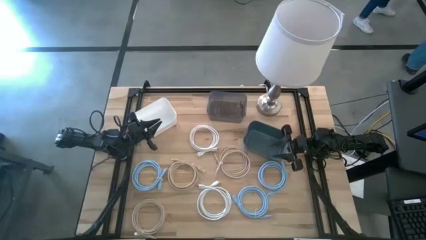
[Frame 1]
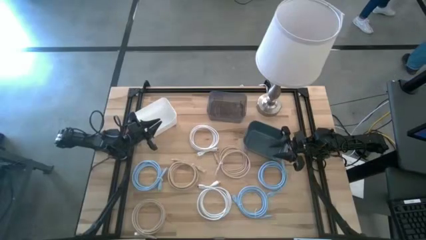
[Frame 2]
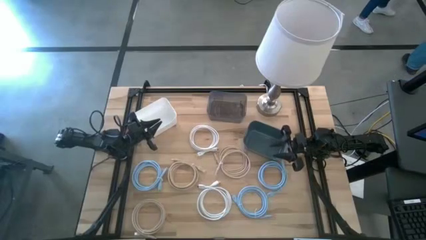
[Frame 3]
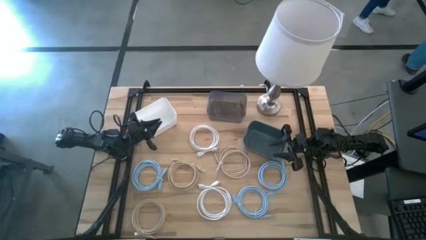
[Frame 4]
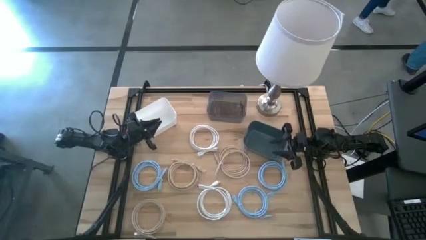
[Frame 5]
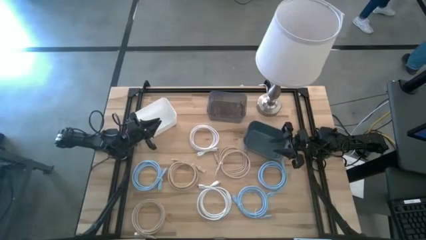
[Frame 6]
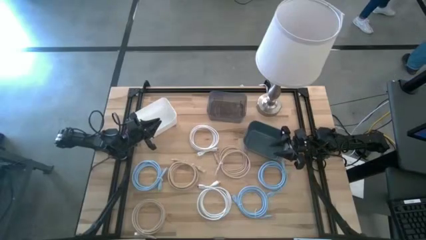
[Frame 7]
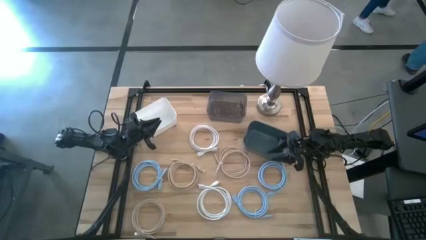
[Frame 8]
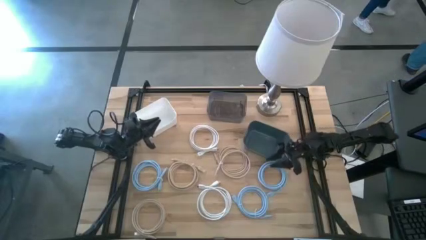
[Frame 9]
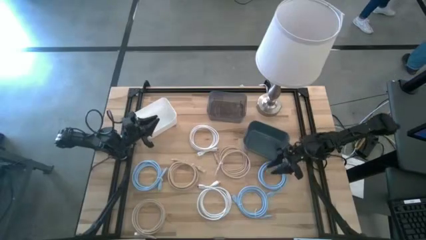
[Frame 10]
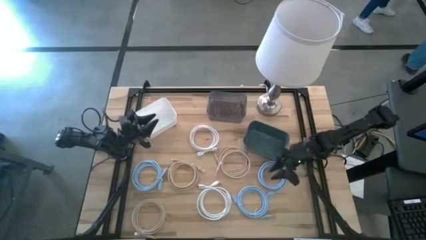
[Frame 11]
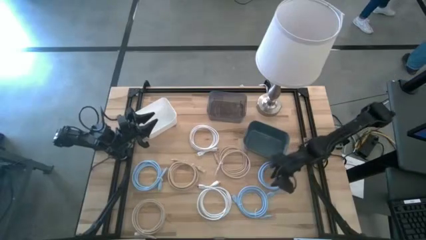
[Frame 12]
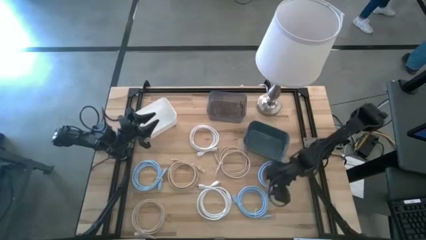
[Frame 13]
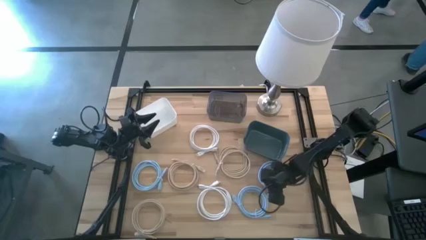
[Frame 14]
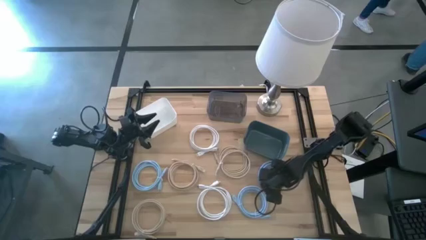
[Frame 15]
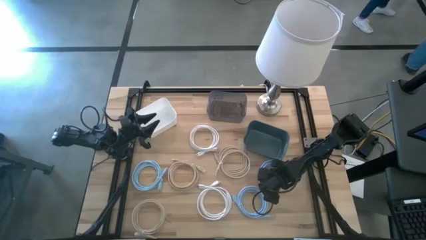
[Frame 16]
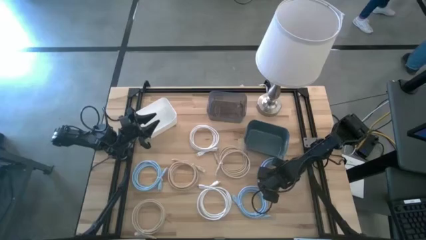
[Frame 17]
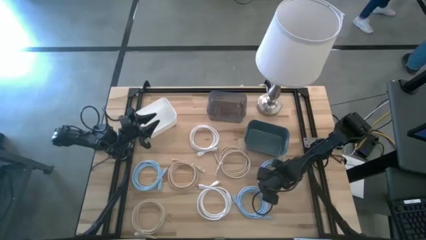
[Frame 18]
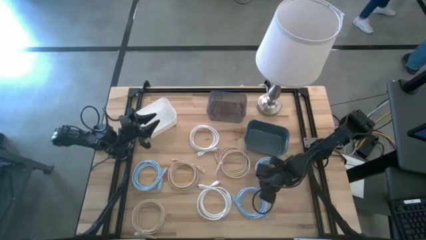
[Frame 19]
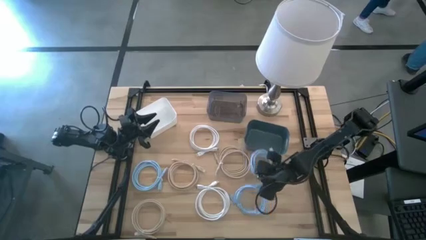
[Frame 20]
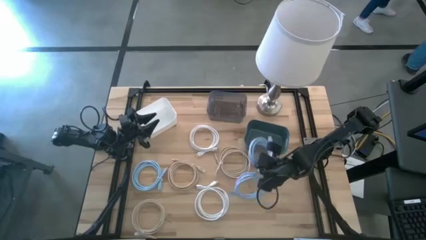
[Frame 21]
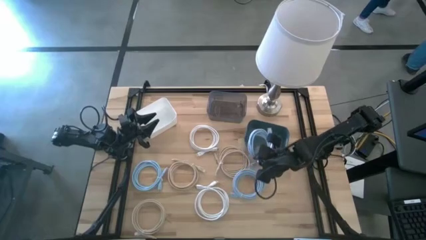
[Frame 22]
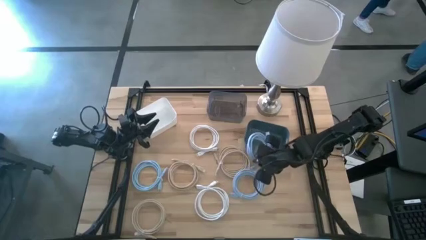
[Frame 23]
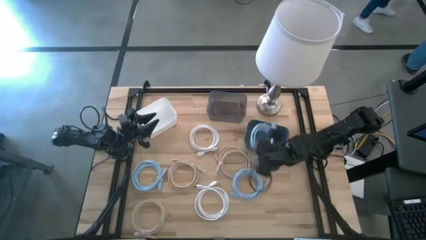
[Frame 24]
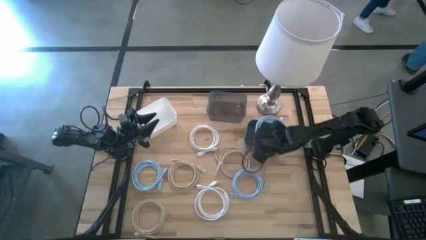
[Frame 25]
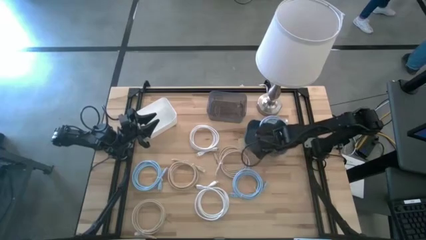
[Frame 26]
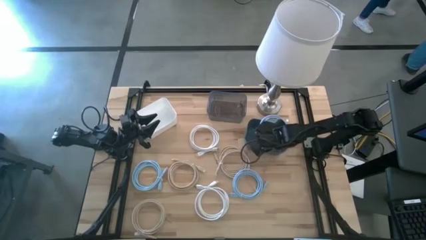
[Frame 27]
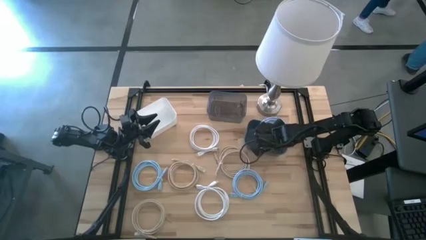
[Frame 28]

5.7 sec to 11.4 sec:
Task: Pick & Place USB Port
Put the top blue charger cable into the blue bin

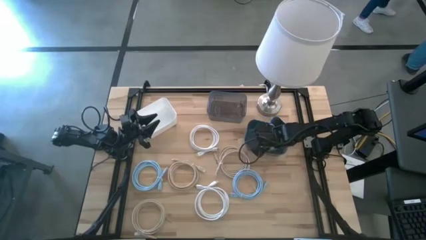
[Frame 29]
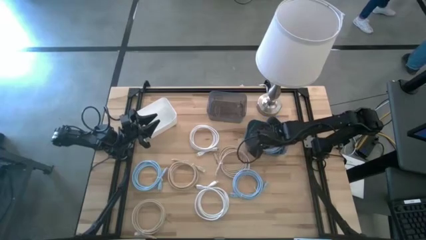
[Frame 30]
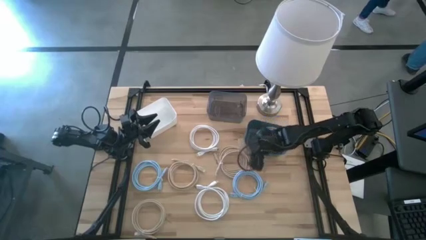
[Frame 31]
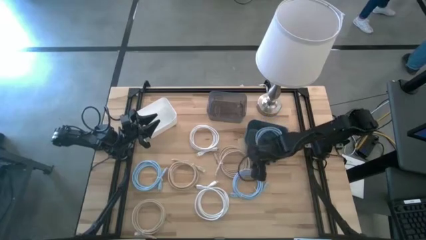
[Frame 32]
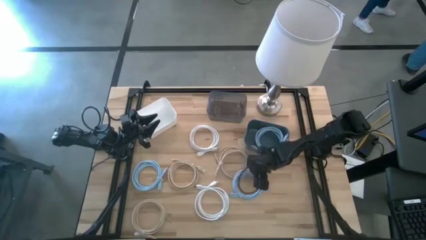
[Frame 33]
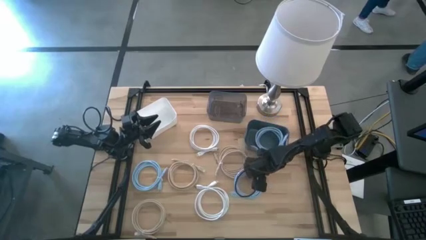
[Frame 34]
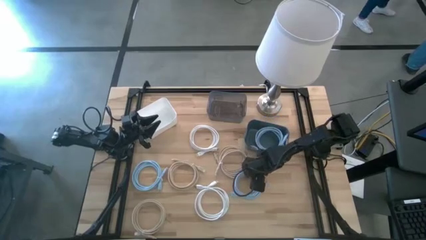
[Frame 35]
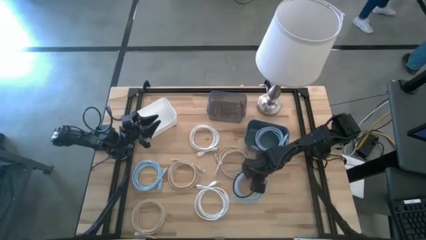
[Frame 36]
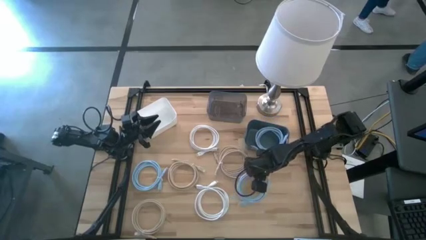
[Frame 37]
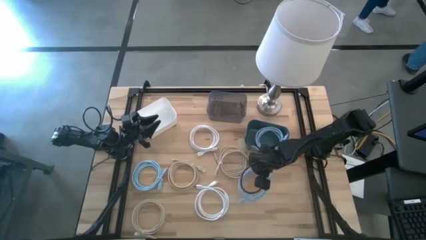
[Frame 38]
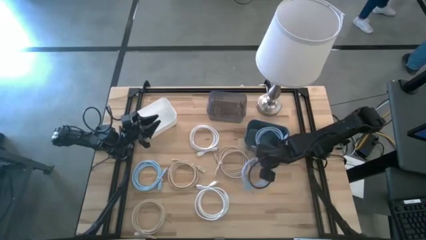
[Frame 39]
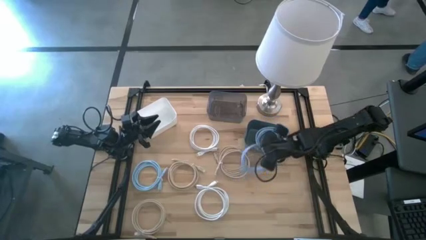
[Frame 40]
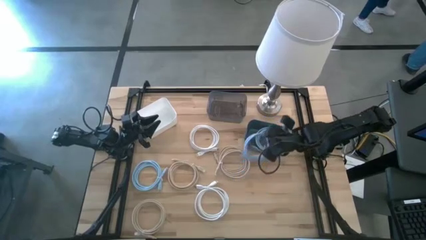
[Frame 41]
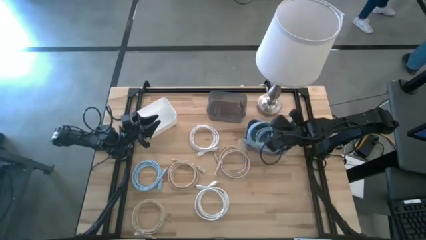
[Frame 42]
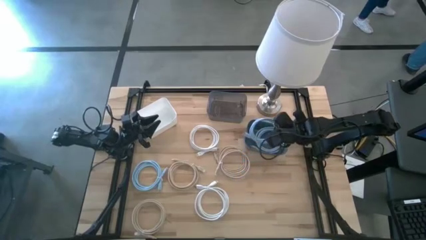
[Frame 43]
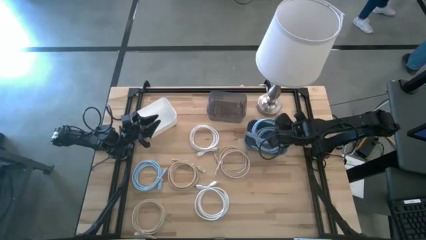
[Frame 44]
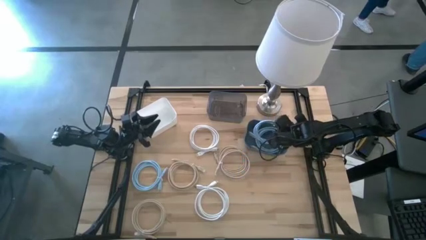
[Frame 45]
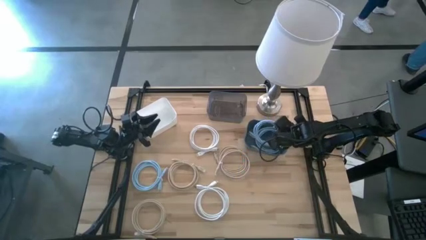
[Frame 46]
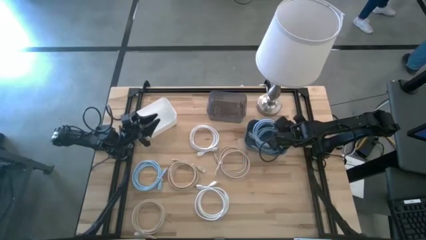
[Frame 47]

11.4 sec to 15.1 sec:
Put the right blue charger cable into the blue bin

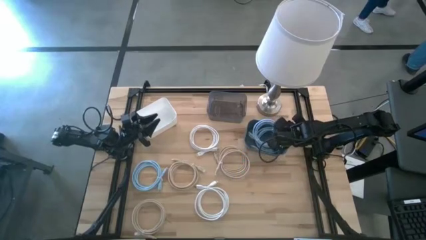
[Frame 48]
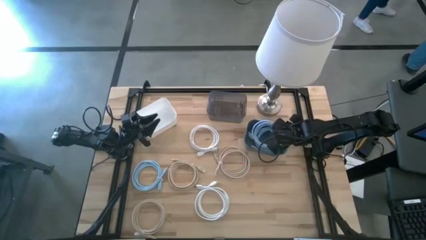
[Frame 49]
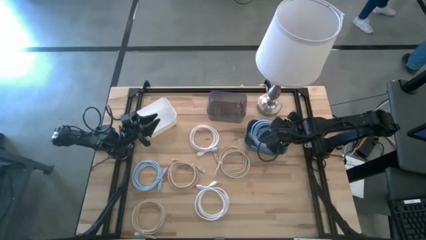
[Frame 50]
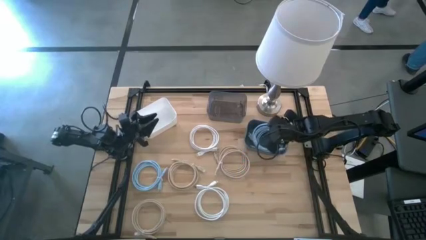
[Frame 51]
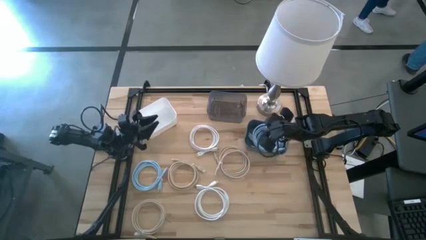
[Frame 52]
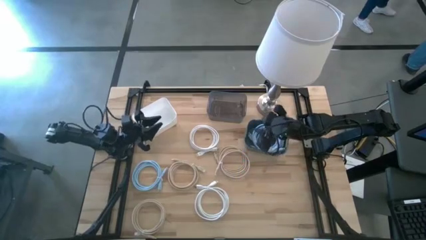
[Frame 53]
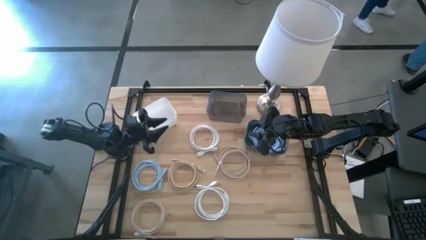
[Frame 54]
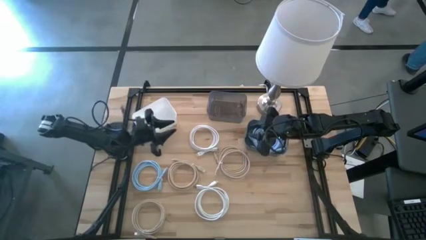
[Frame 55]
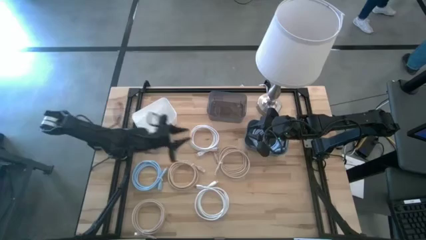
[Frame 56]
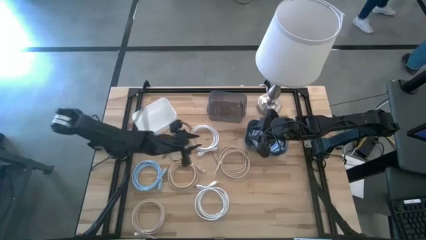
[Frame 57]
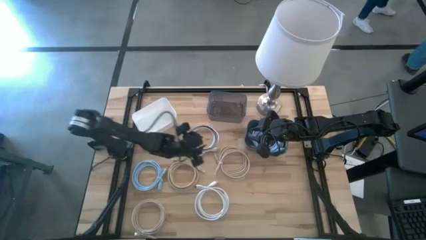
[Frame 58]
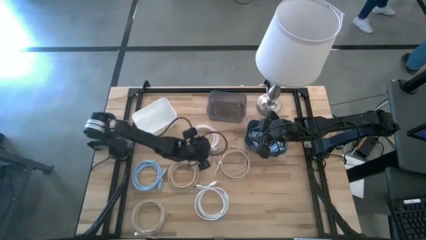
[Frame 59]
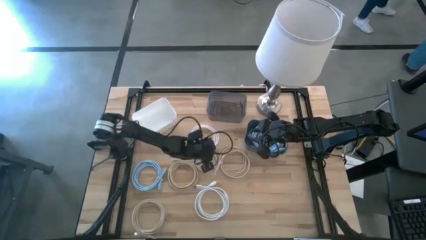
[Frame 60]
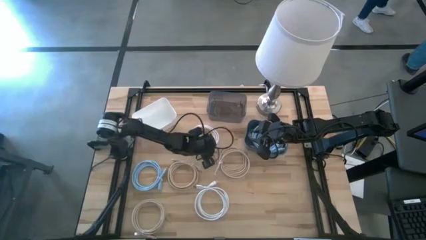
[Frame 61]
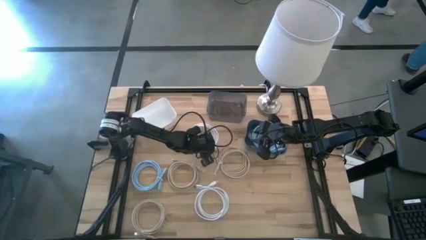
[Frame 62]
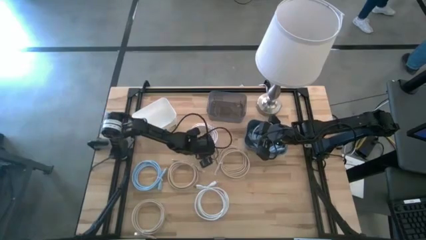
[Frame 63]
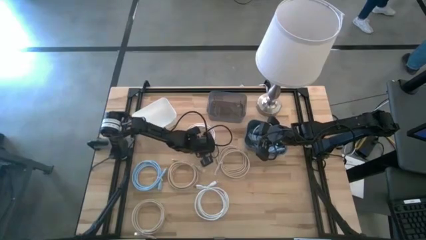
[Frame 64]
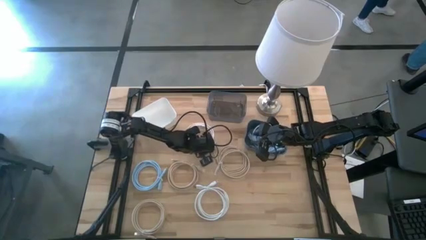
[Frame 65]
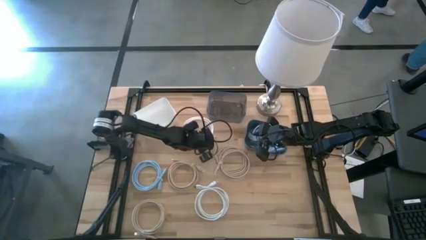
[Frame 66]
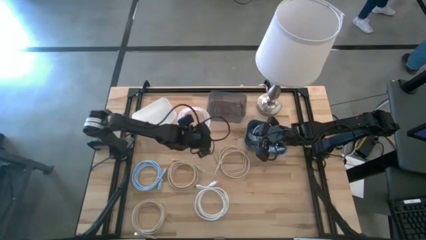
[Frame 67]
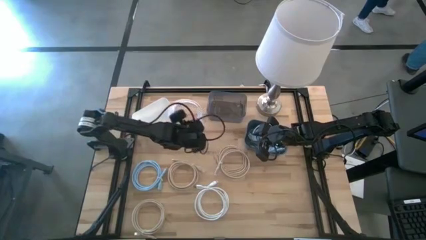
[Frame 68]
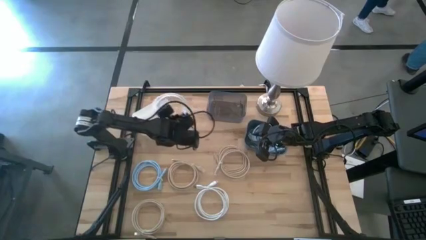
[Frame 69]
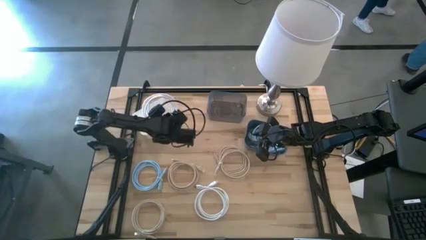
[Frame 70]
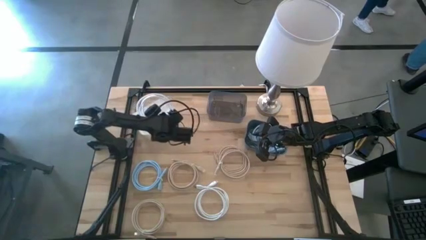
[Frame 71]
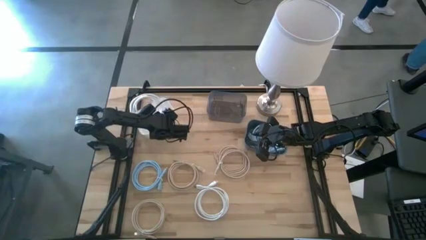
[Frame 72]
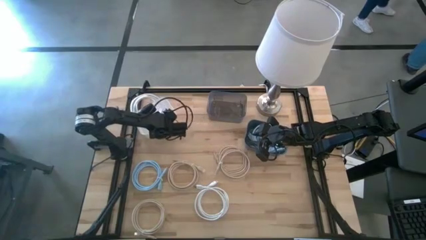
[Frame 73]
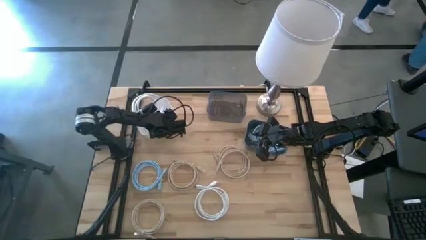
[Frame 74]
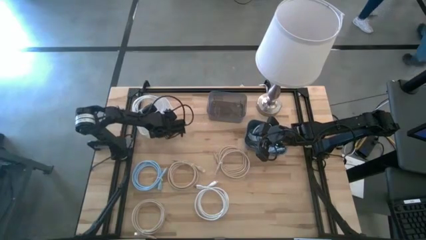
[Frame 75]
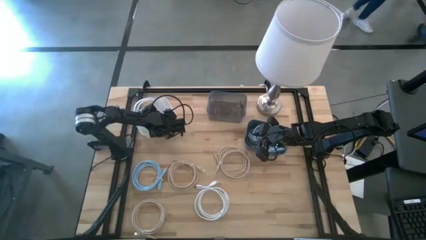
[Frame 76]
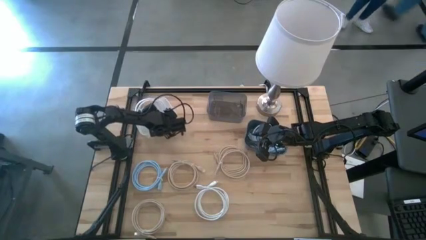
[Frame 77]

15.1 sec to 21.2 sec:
Put the top white charger cable into the white bin
